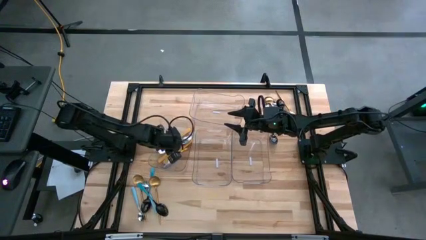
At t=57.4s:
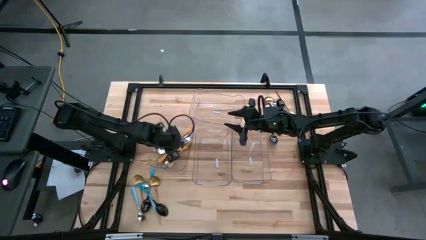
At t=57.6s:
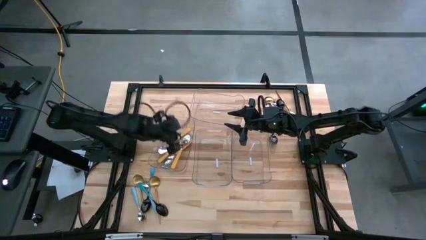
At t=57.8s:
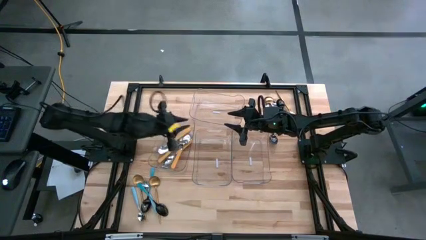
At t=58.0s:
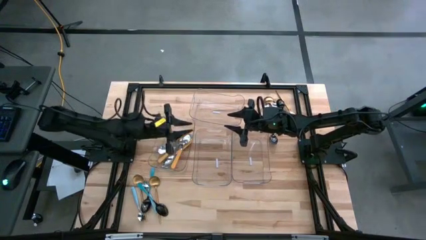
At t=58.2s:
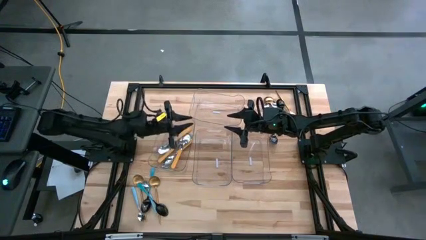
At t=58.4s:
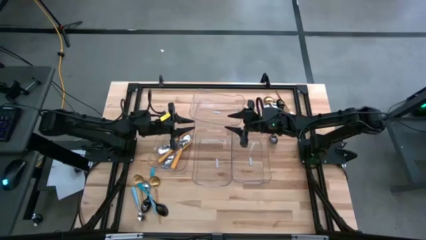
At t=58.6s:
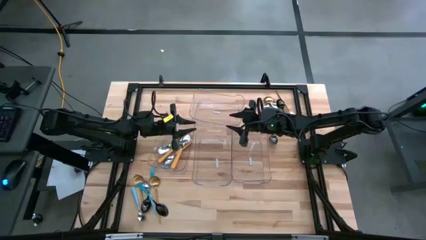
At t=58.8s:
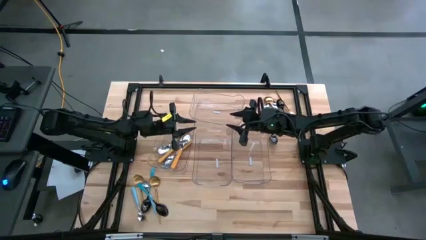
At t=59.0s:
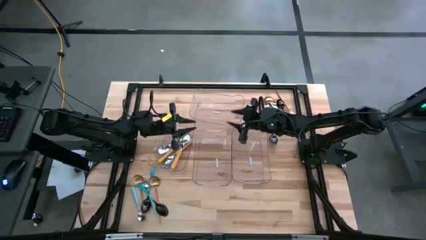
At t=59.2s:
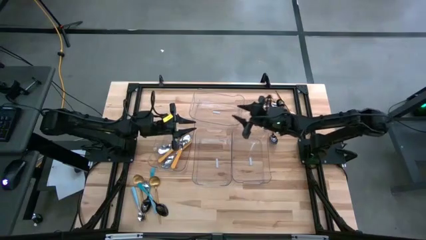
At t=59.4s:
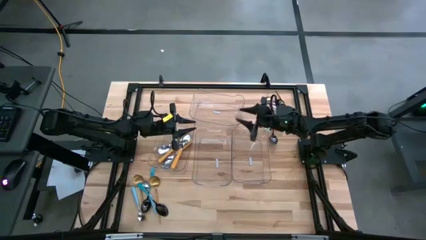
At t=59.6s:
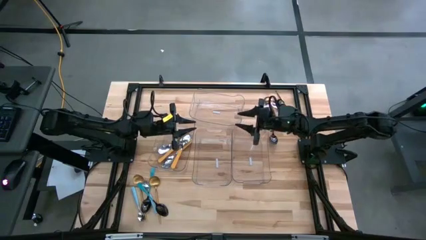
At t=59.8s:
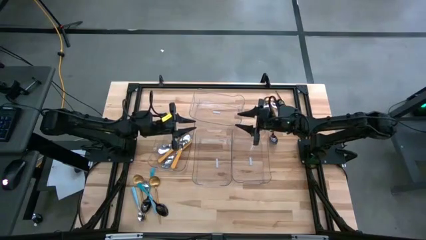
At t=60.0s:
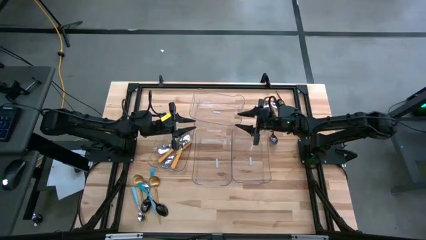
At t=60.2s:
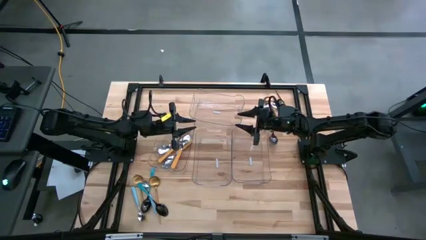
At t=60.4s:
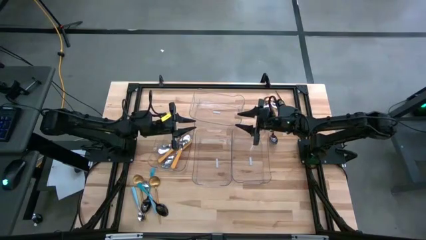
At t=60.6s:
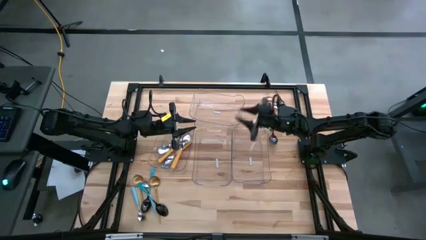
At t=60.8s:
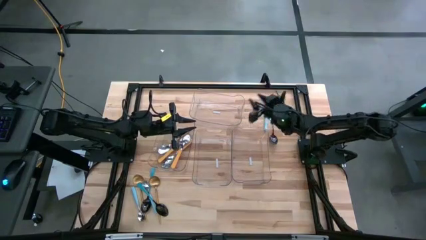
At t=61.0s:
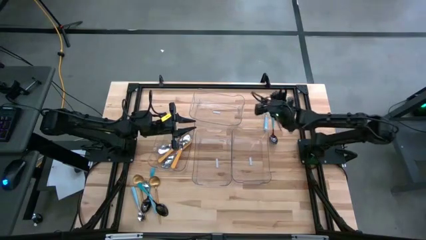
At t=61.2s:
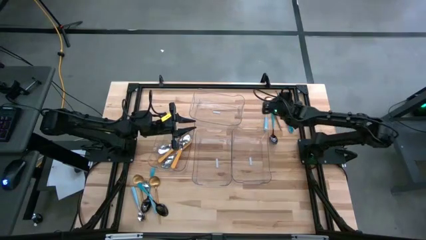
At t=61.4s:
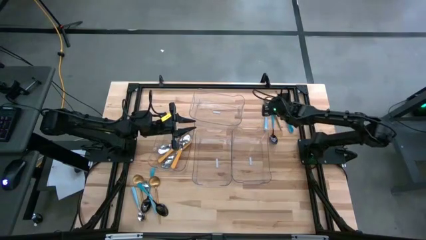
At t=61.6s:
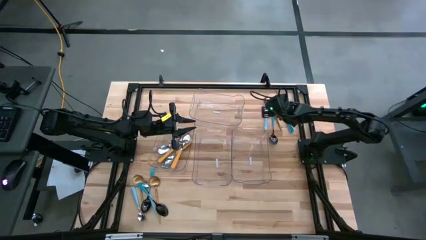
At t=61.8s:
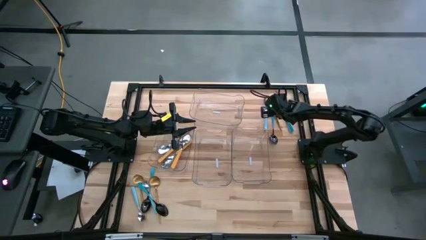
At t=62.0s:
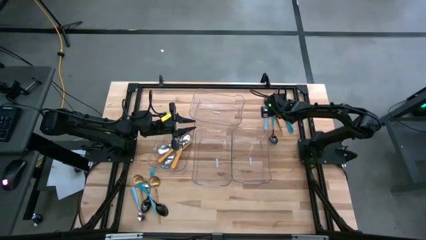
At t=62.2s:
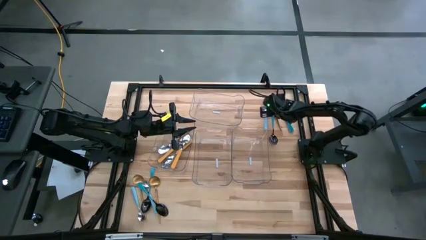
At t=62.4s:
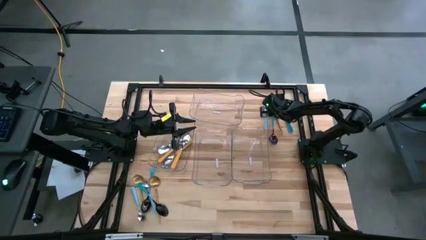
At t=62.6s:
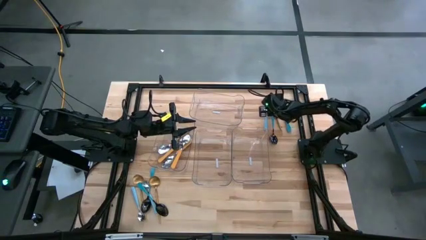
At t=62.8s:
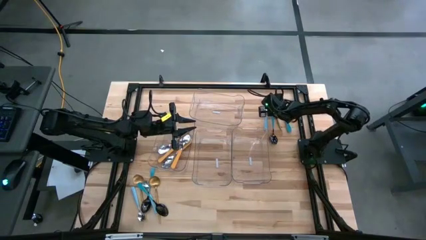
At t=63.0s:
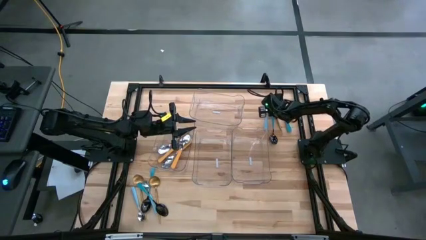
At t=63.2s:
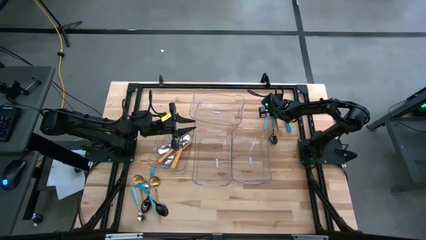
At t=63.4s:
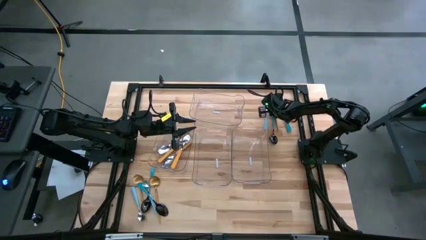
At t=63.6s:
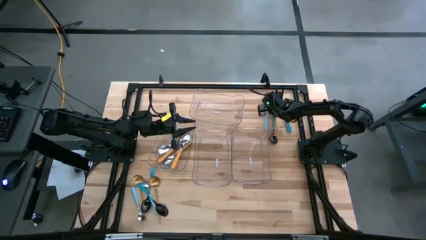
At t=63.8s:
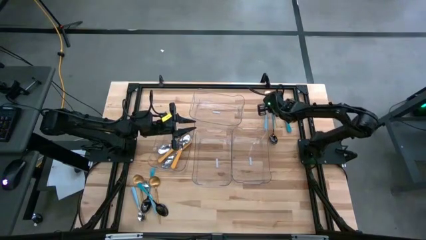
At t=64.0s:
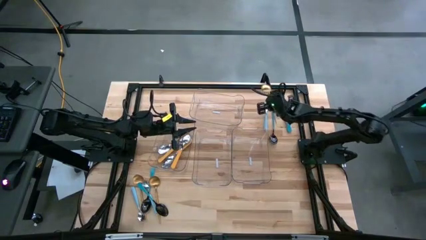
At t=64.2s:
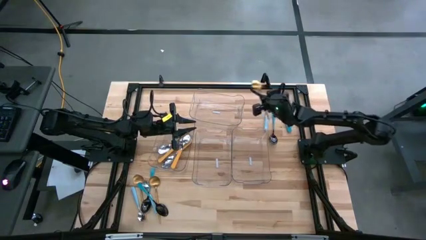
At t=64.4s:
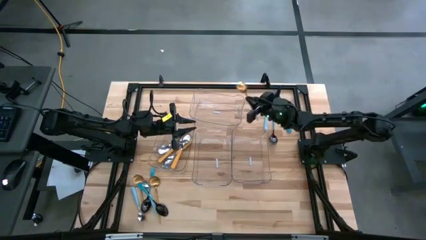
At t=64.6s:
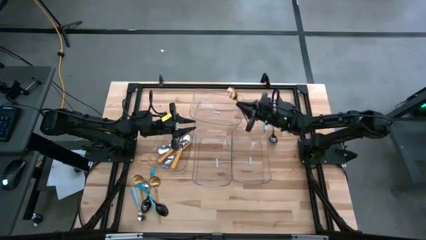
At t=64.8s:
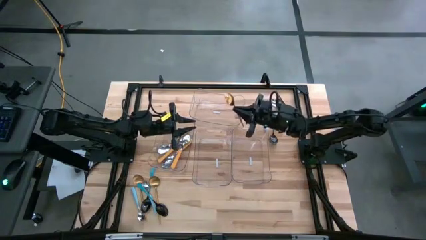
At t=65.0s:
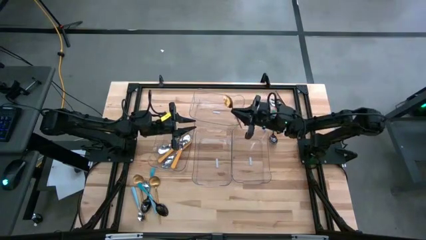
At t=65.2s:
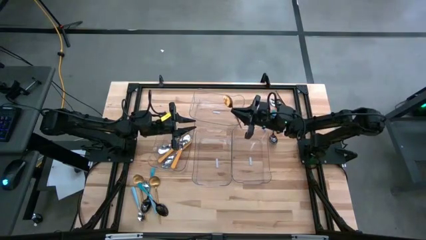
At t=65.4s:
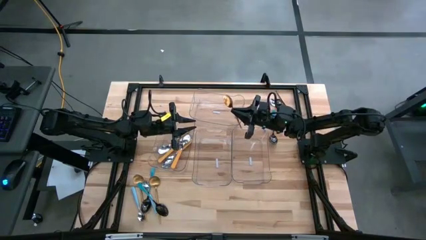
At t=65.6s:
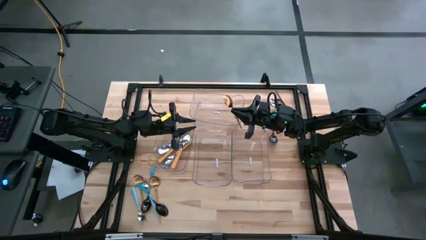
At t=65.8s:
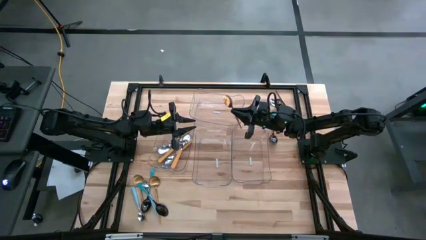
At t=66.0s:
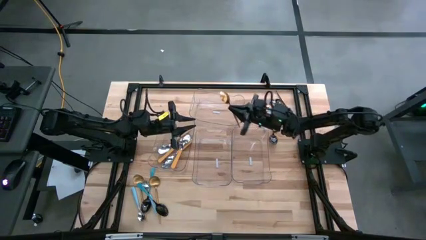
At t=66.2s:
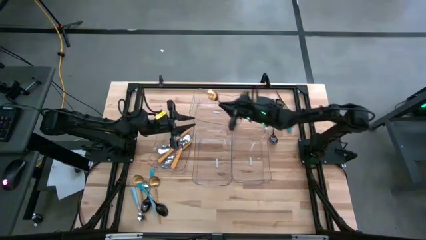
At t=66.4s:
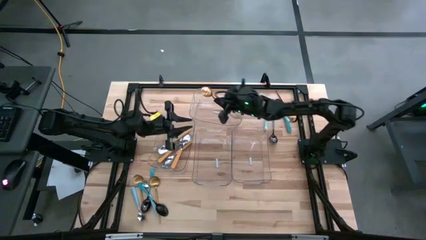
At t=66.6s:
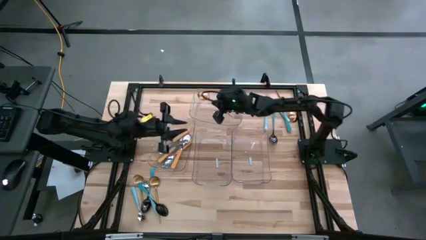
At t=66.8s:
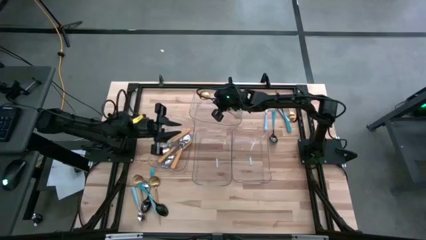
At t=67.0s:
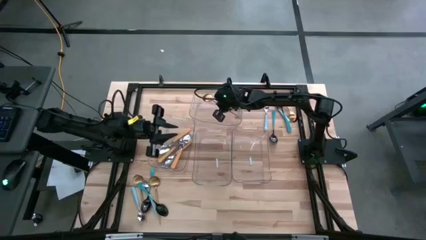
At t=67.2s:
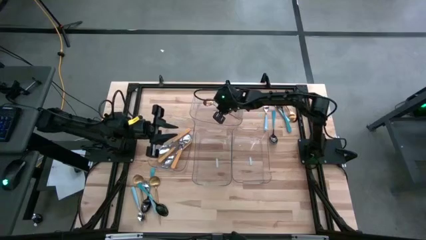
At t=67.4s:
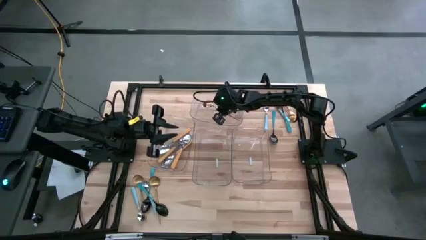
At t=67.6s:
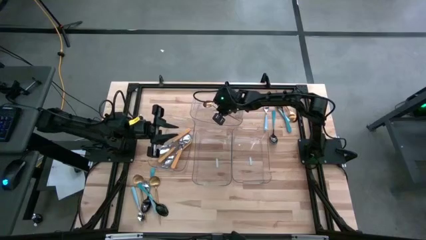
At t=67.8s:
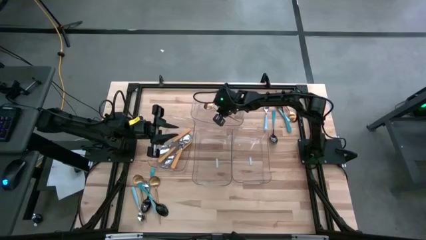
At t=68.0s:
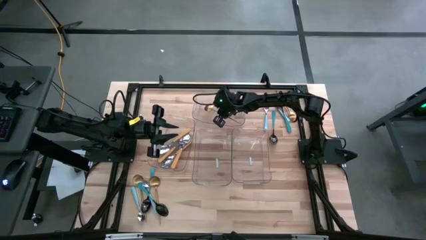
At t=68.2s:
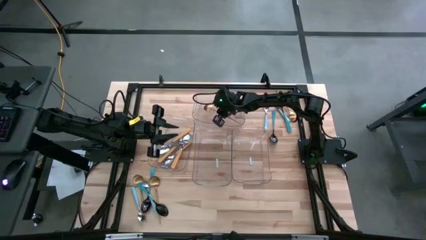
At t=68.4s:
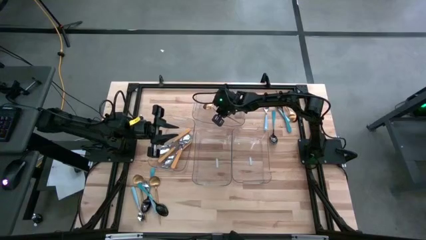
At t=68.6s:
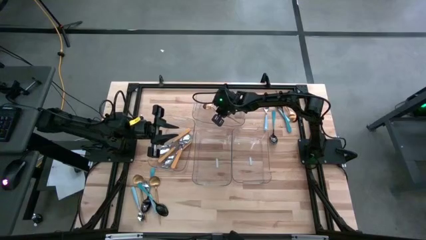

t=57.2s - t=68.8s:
Task: Sort silverware by color (type)
Put the gold spoon into the top transparent bin

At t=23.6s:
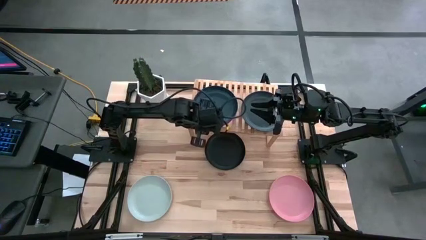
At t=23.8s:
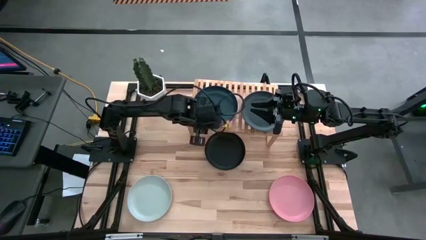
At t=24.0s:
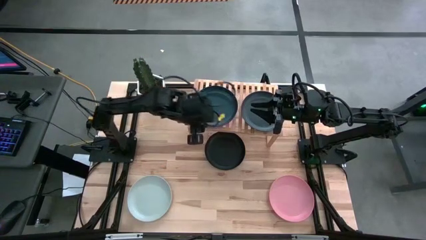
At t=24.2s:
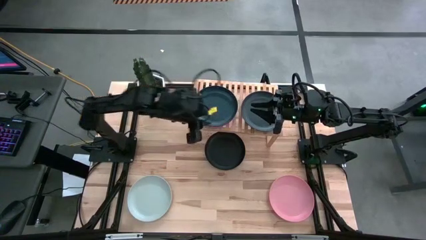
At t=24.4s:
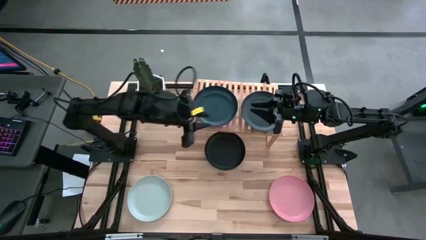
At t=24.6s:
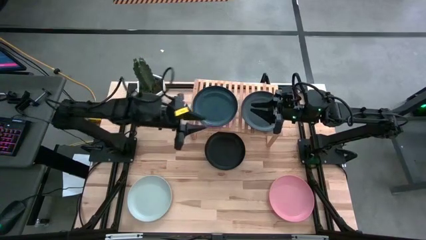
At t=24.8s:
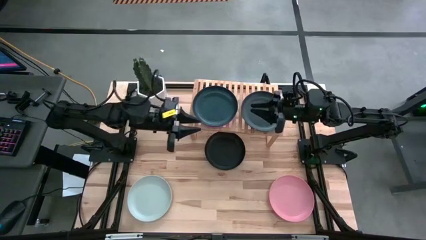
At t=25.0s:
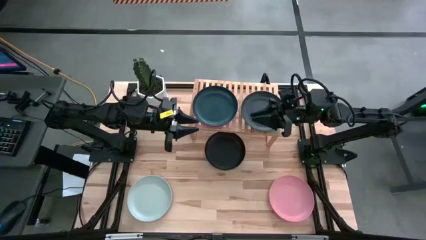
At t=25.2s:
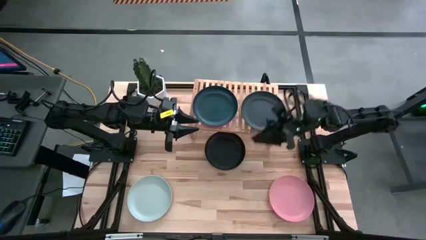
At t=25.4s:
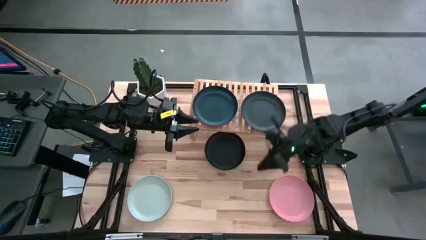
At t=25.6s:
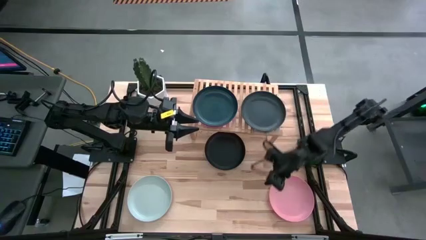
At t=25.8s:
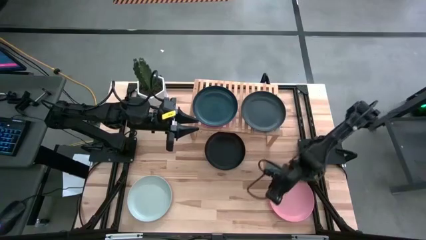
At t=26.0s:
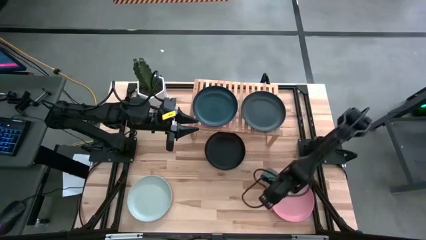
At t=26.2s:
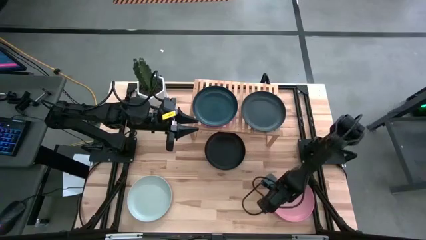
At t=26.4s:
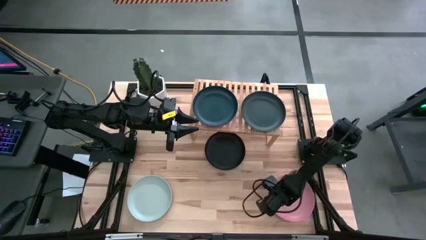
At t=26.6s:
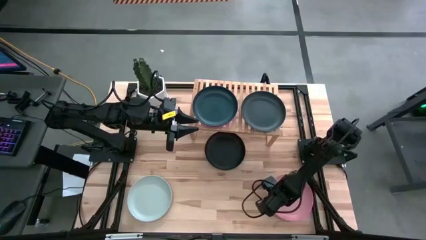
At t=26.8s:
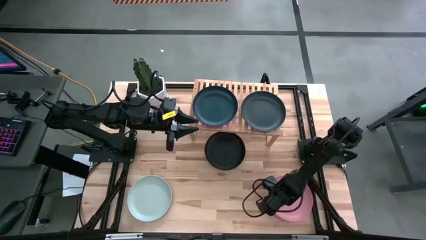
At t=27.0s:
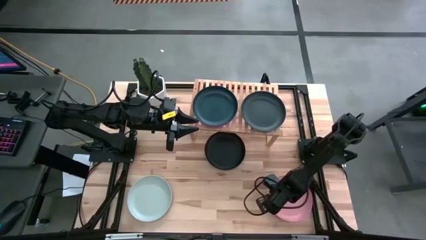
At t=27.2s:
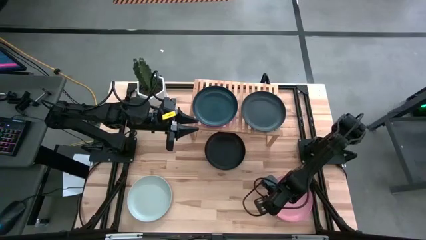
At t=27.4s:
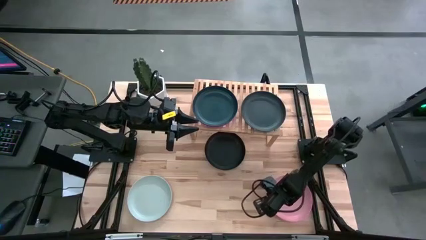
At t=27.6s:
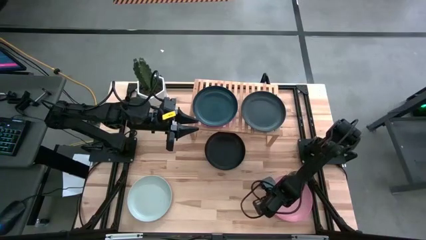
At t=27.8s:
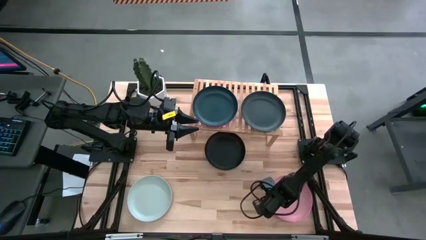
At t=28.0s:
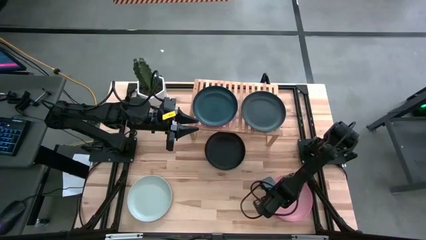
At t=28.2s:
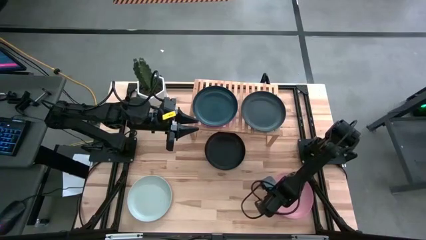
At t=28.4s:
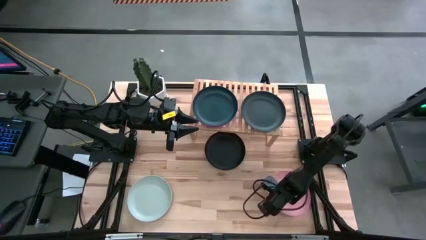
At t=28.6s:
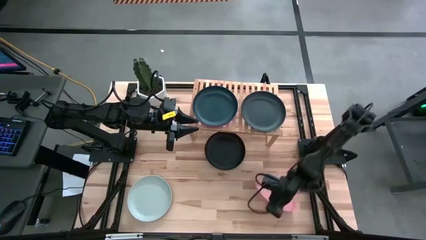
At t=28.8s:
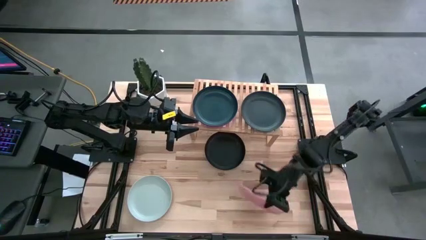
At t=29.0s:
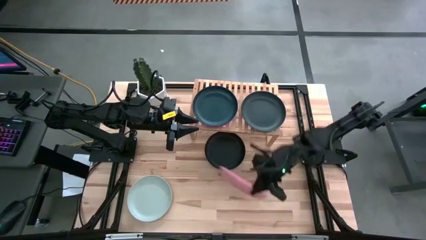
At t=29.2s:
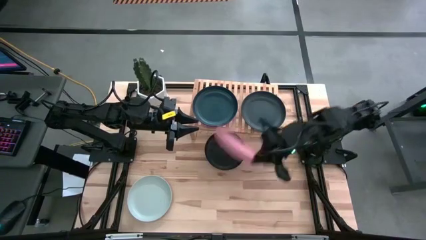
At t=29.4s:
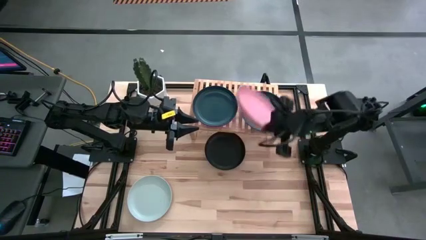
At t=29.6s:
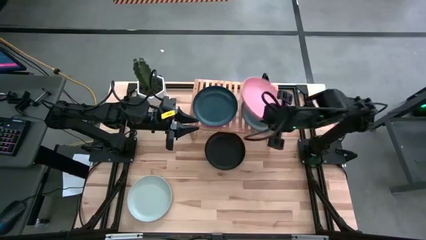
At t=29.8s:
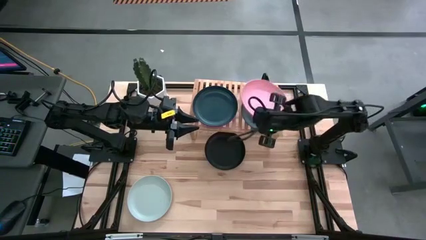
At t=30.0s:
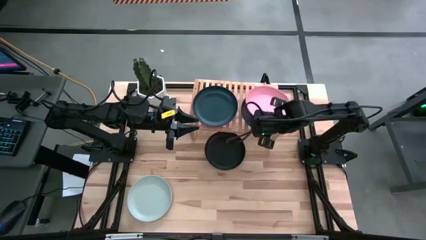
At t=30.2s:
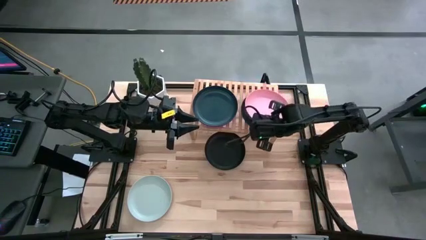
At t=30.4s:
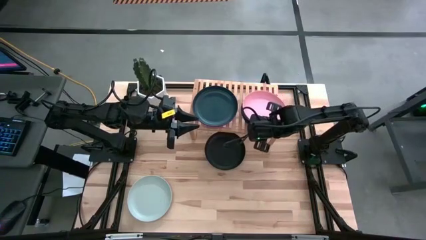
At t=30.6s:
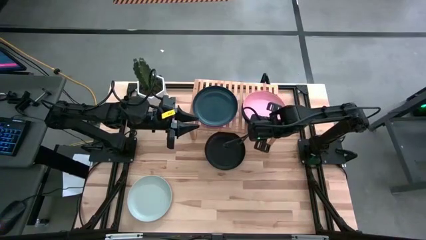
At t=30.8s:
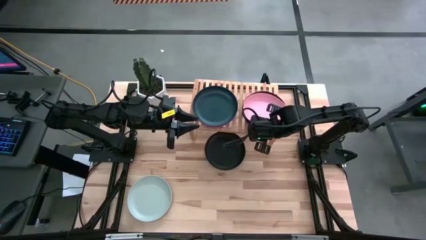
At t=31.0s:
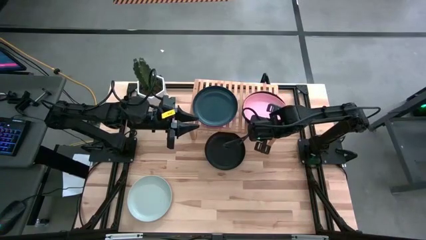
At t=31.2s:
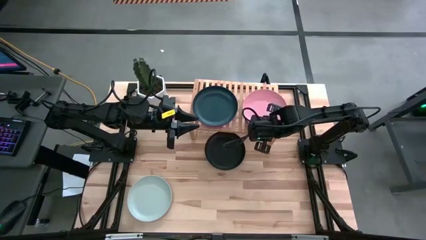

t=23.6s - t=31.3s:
Task: Place and stack plates onto a shelf
Stack the light pink plate on top of the black plate on the shelf
